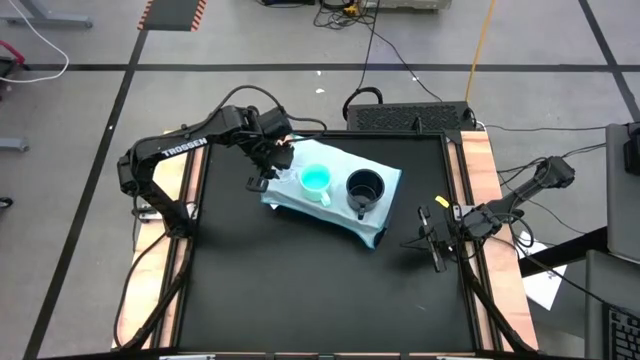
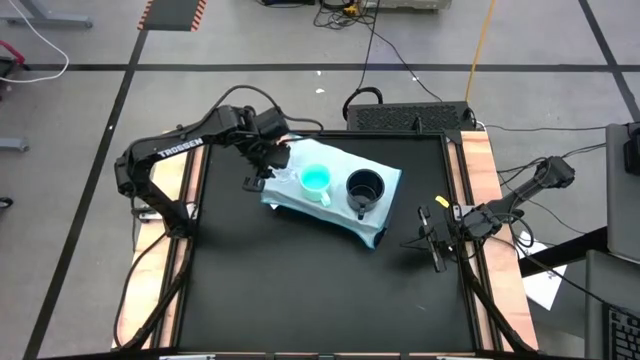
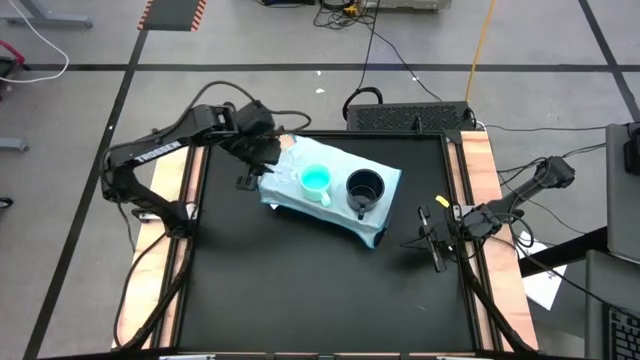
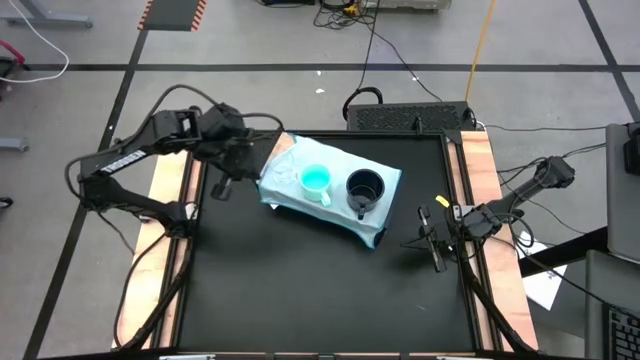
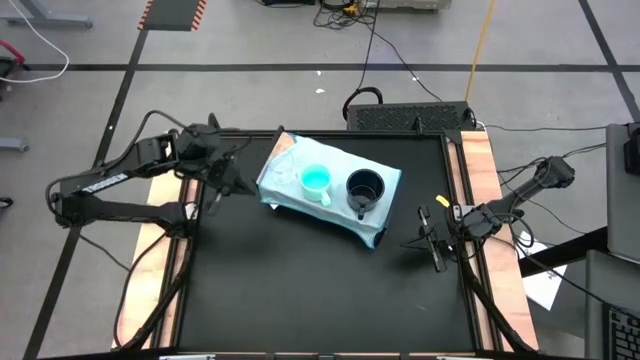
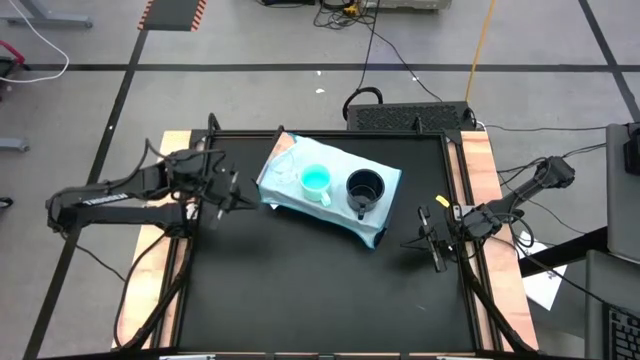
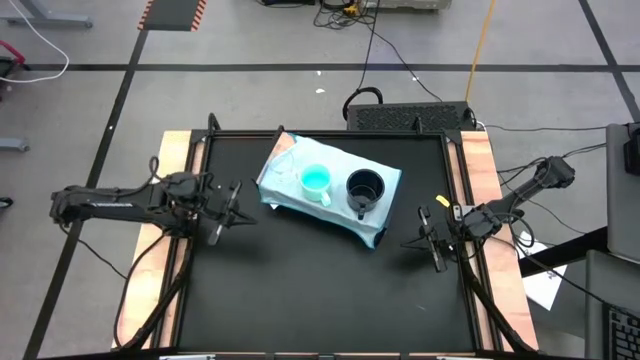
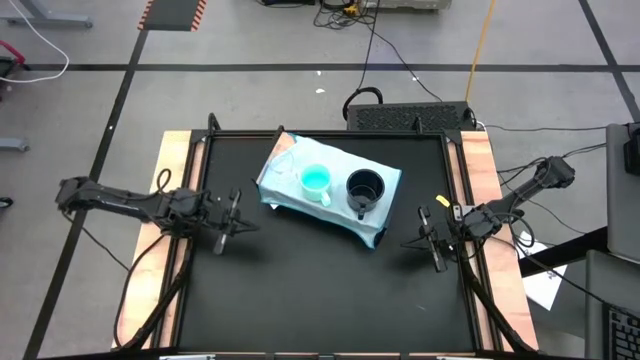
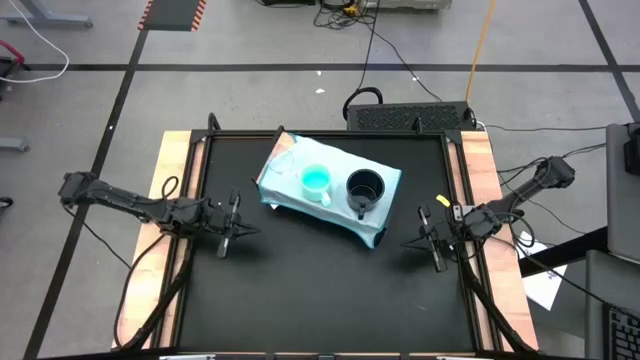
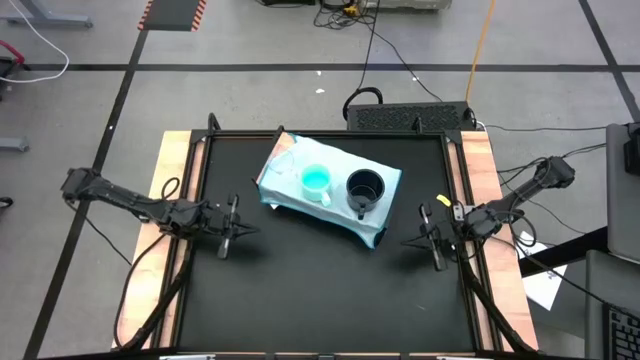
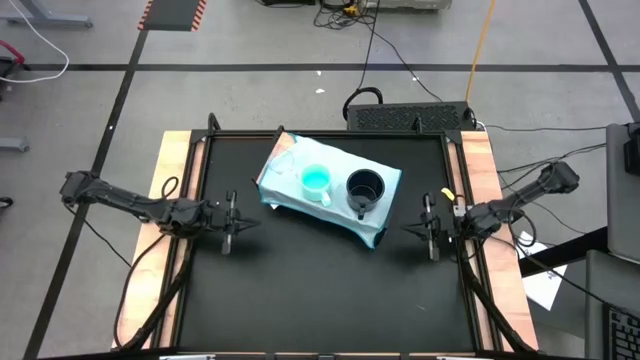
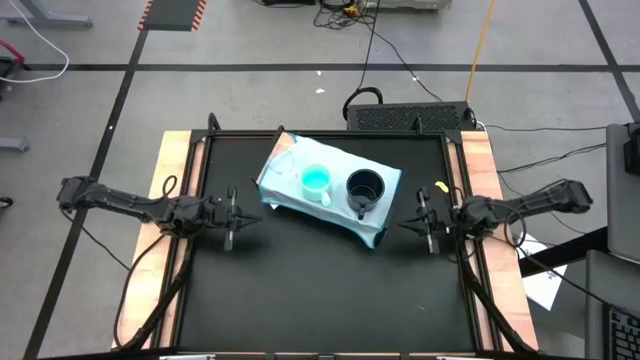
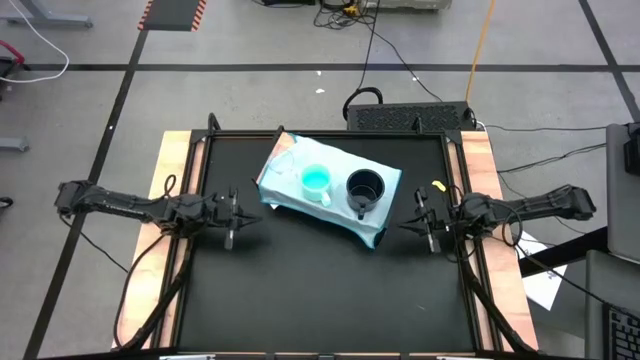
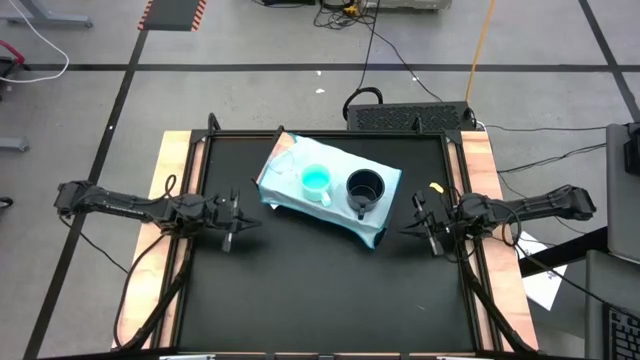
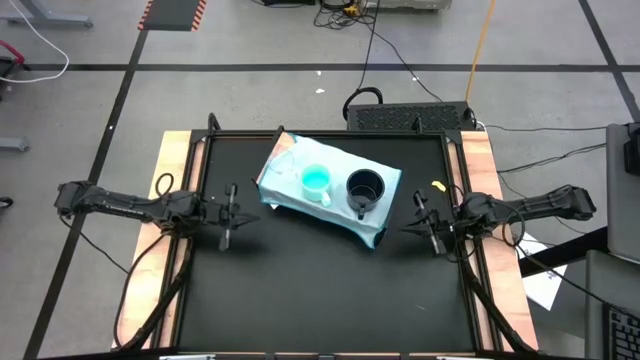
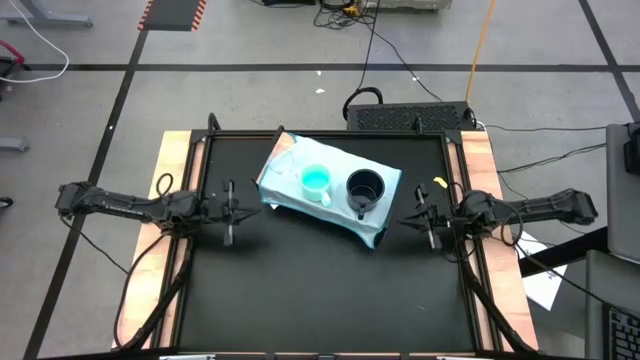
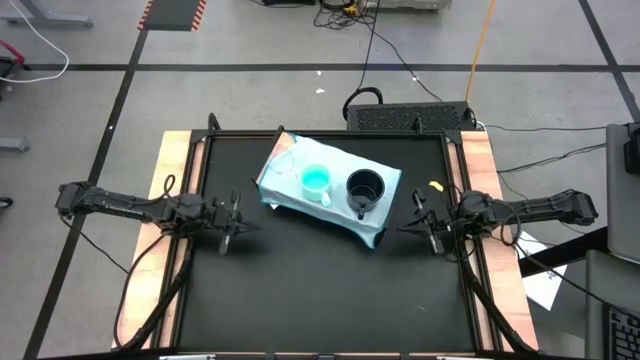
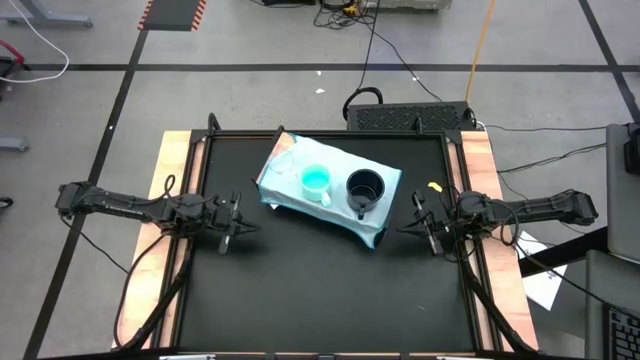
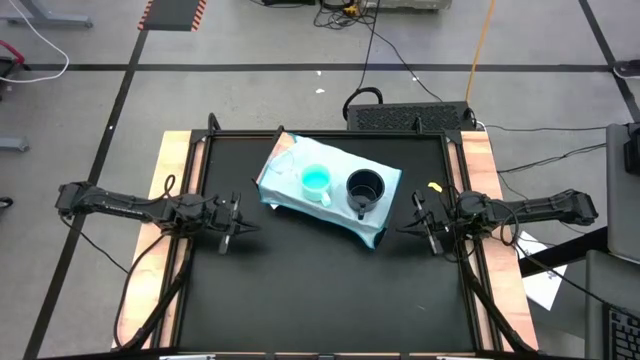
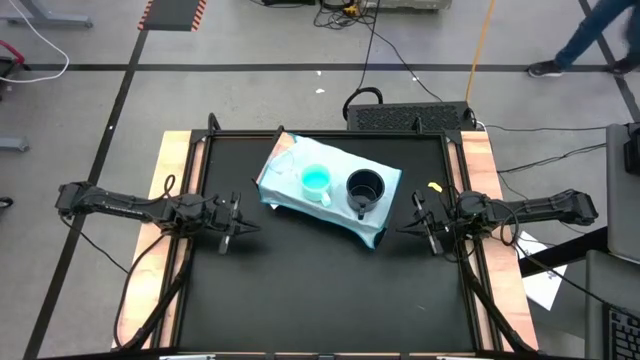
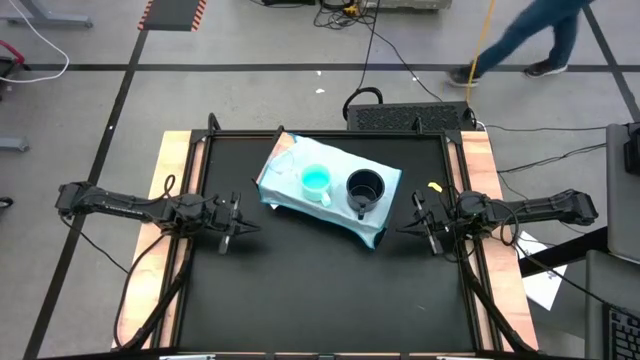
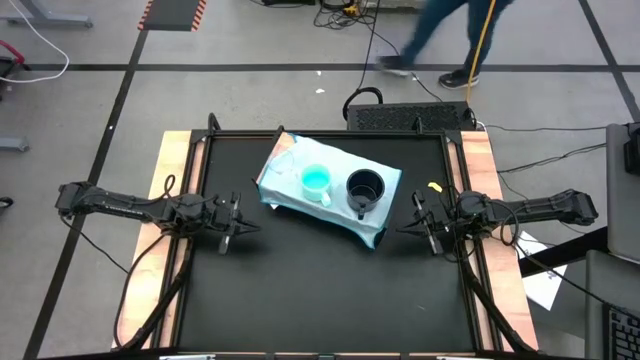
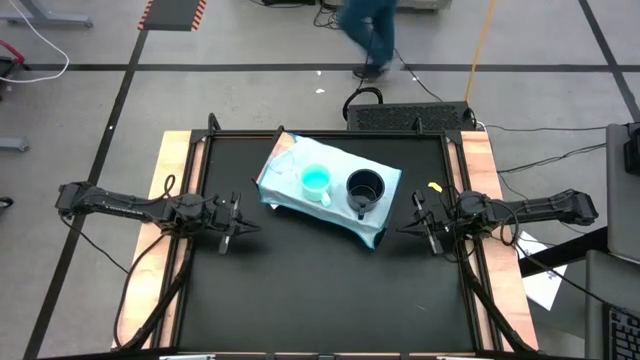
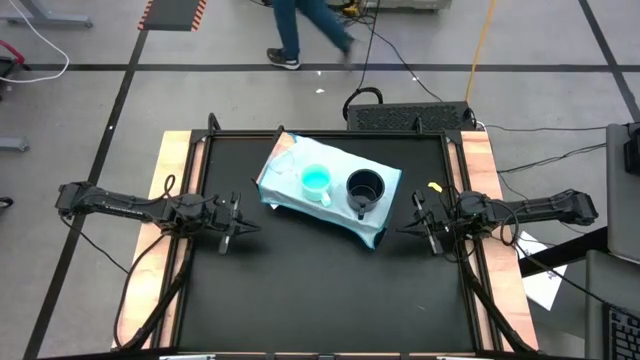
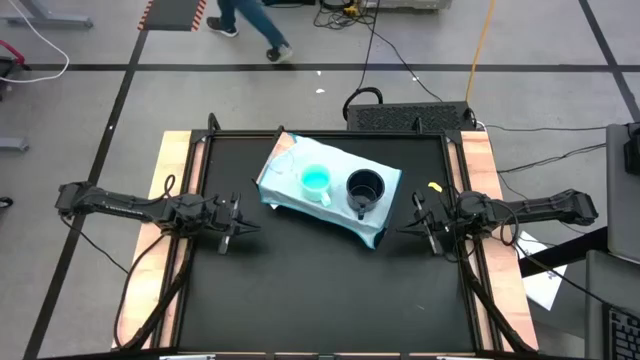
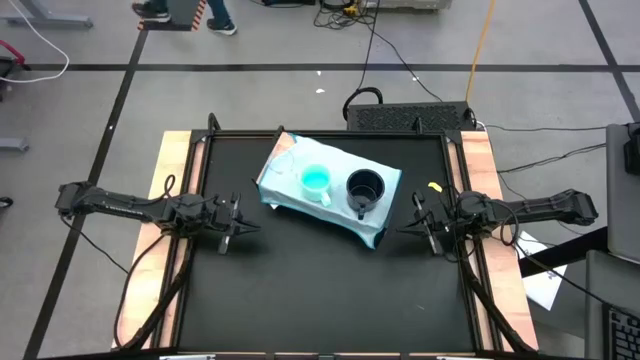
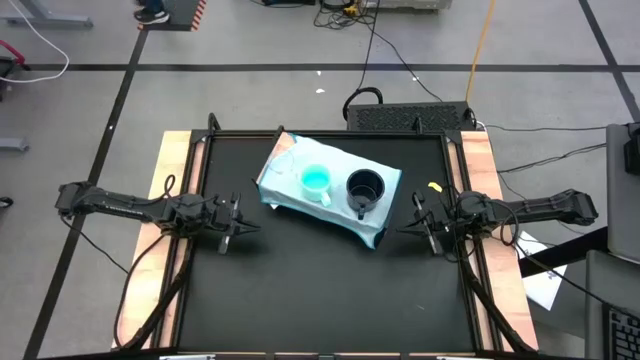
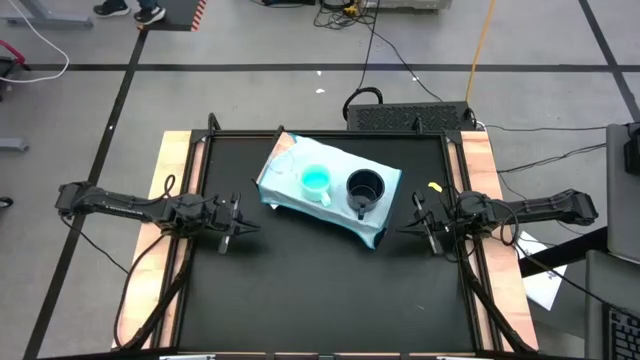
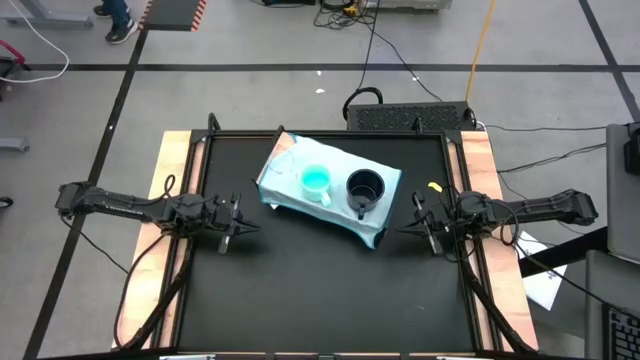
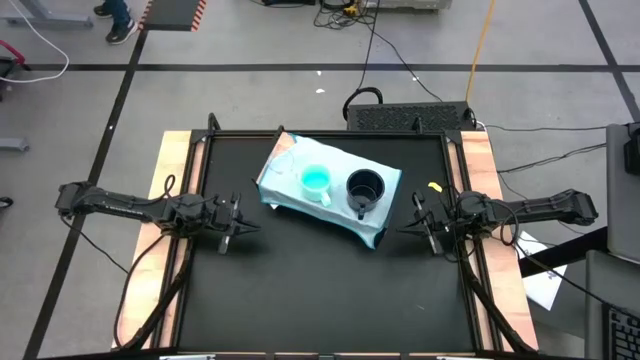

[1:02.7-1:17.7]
Task: Stack small to large cups/mugs on shelf
Return to Home Position

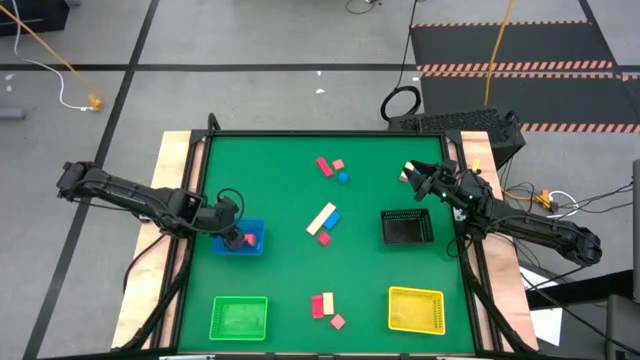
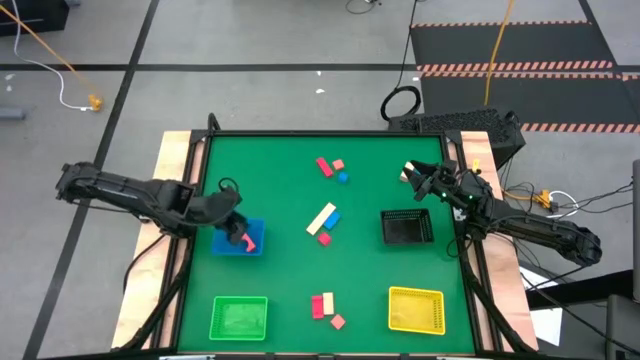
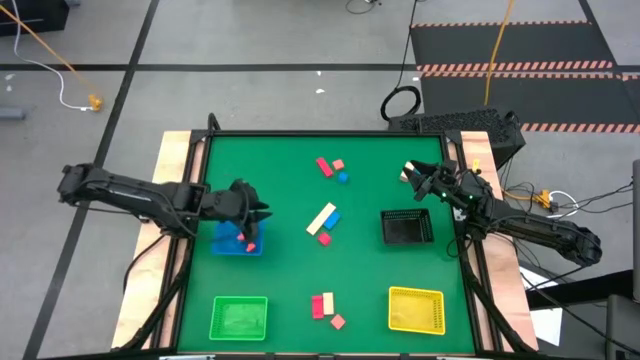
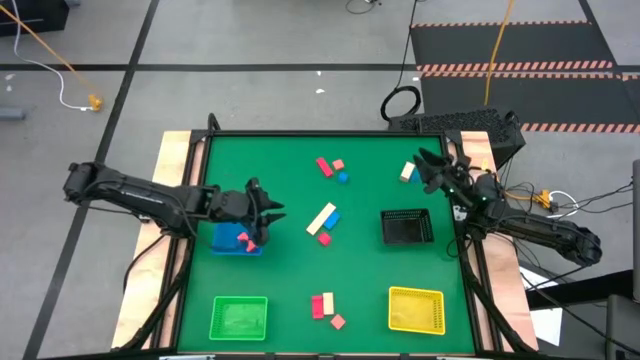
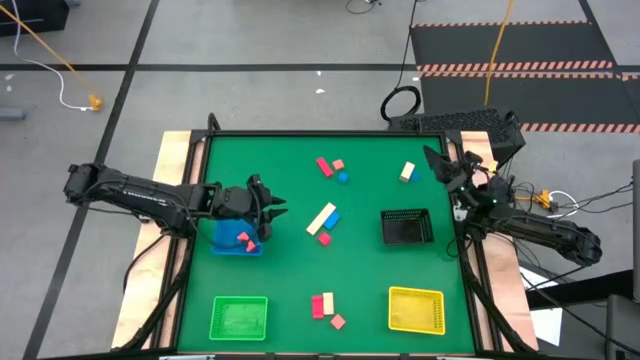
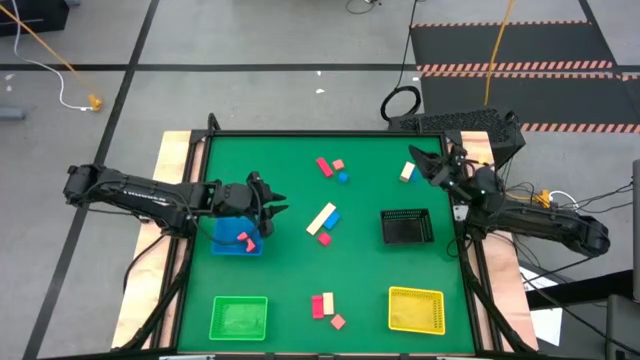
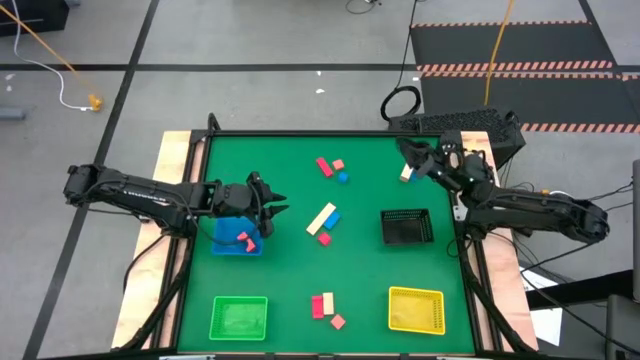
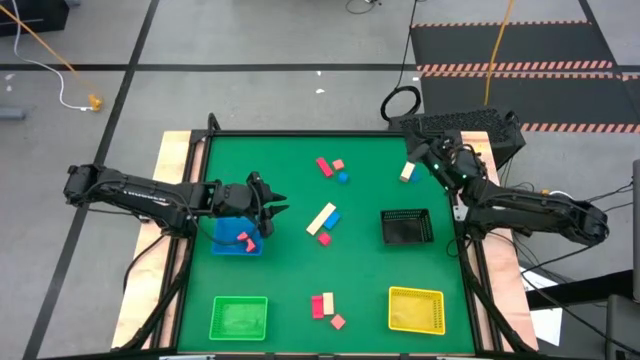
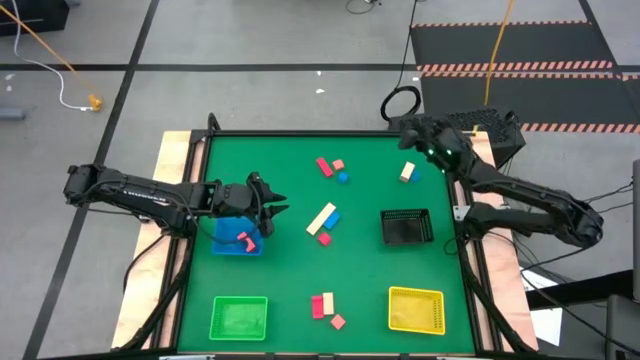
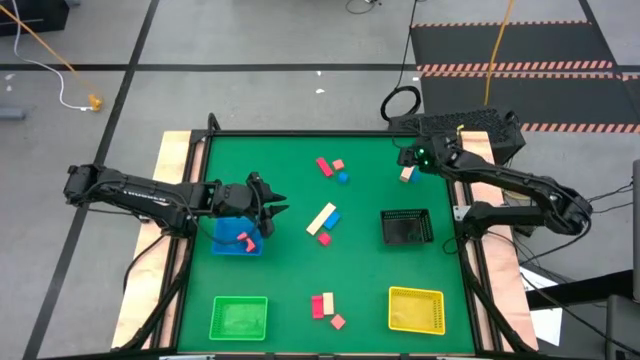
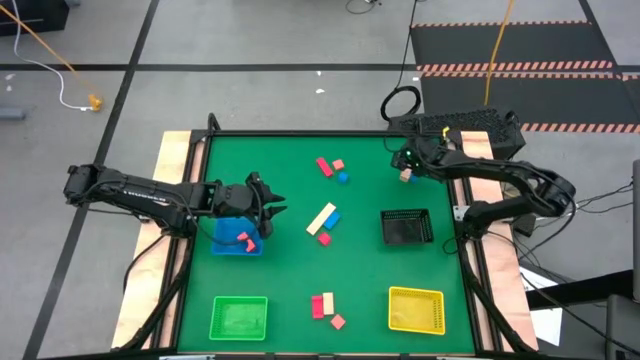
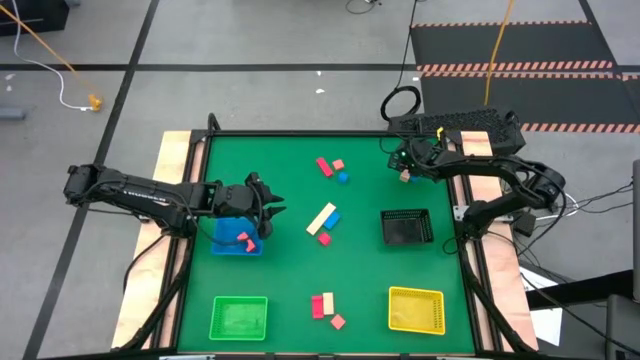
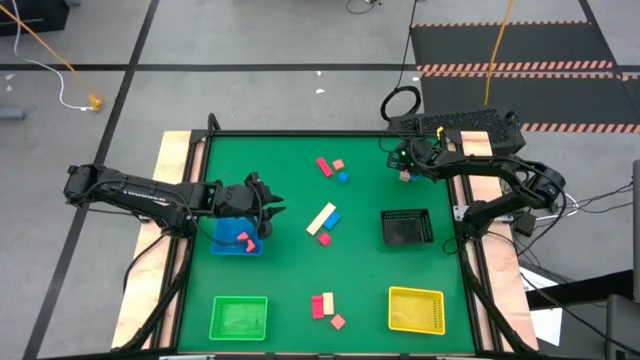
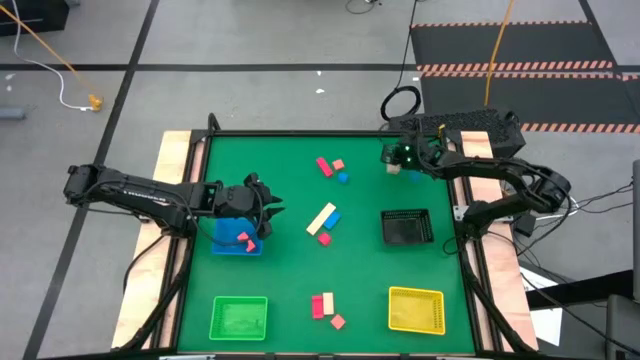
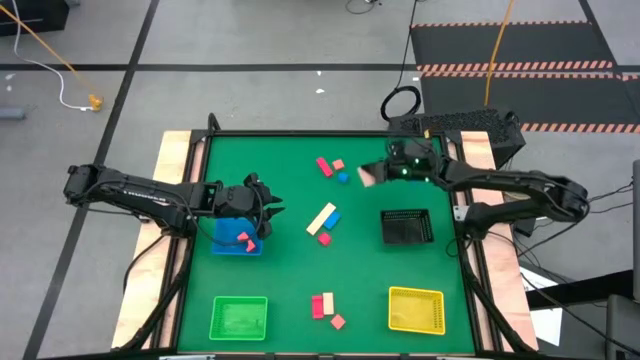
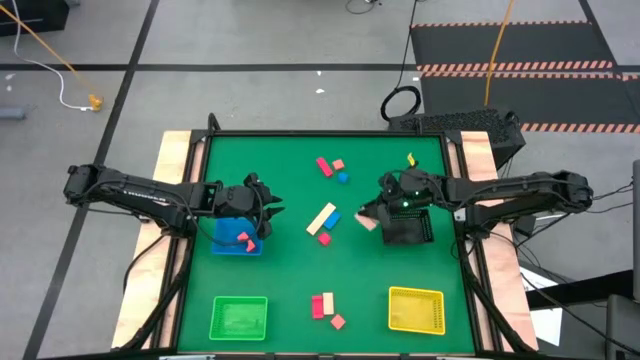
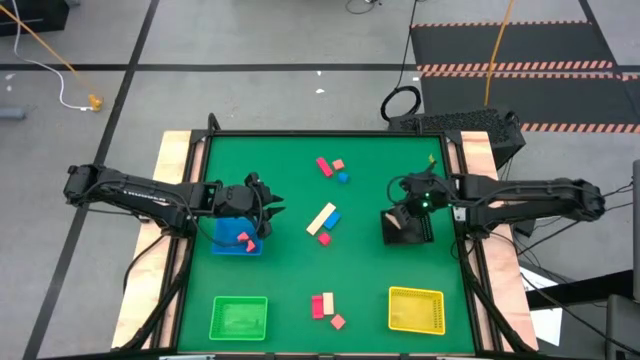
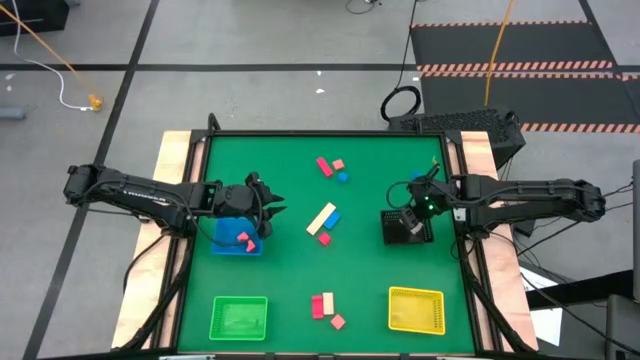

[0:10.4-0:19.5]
Task: Sort & place blocks by color
Put the top right white block into the black bin
